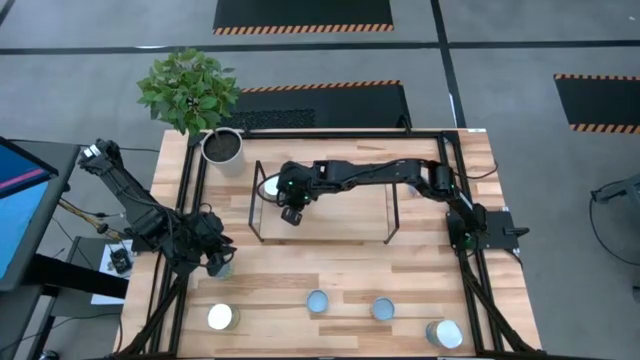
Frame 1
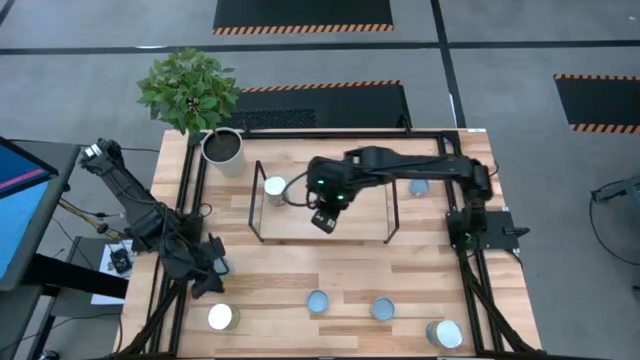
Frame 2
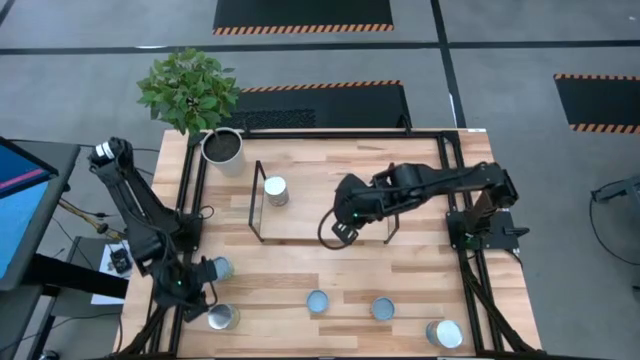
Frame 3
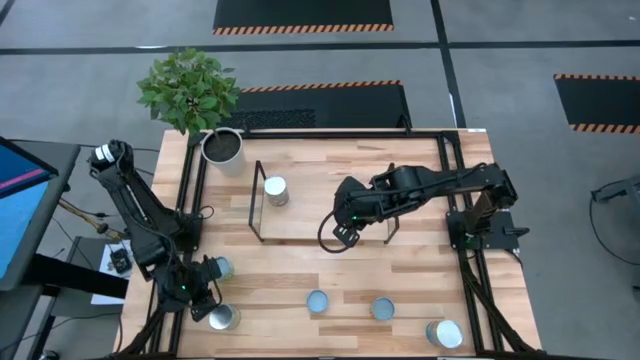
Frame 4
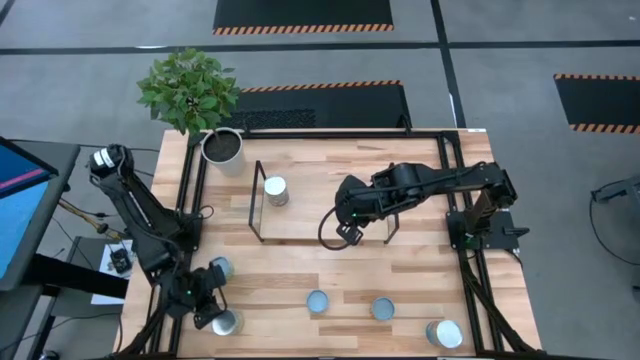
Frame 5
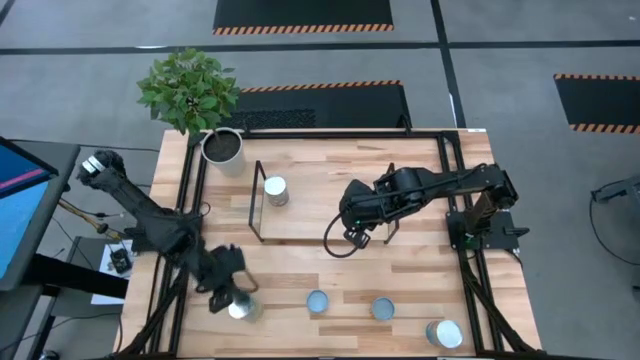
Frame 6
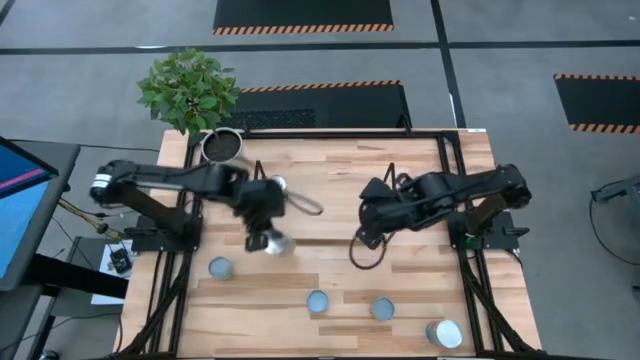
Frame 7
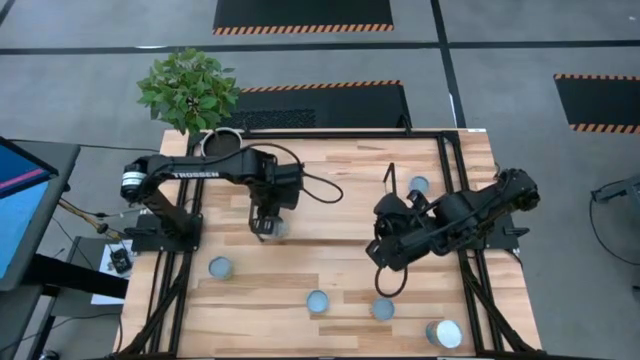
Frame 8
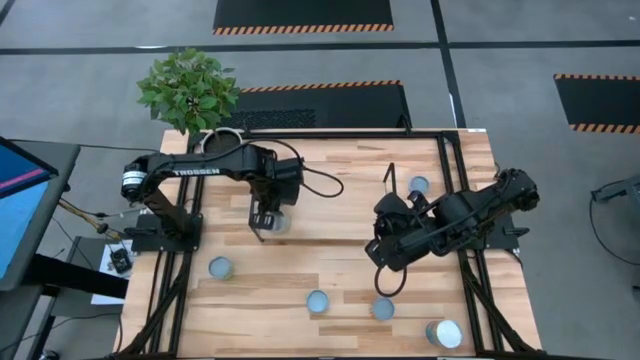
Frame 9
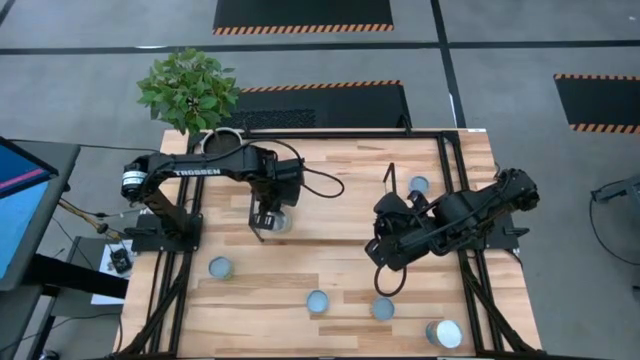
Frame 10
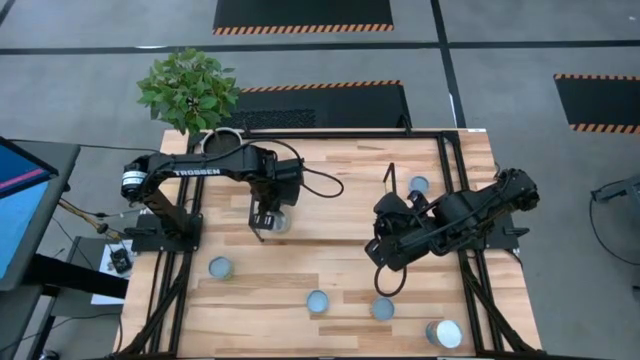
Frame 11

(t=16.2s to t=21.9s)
Task: Pick and place cans onto a shelf
Put the canned carrots on the shelf

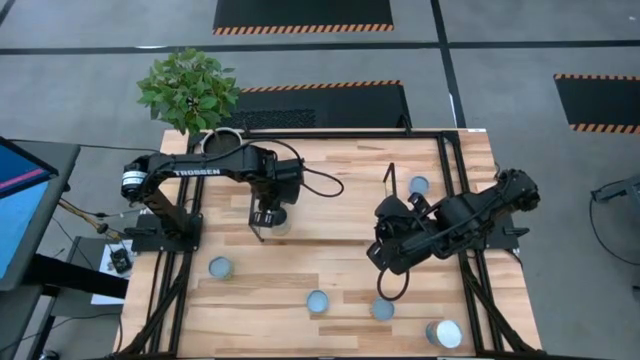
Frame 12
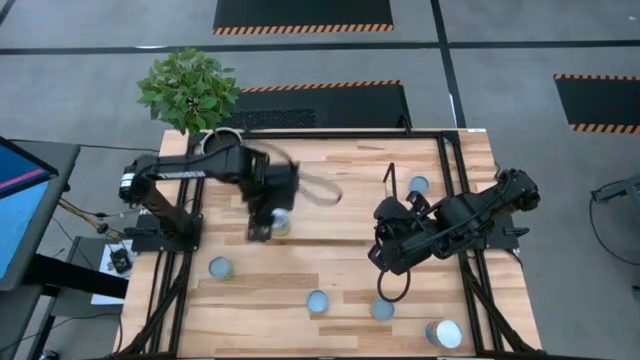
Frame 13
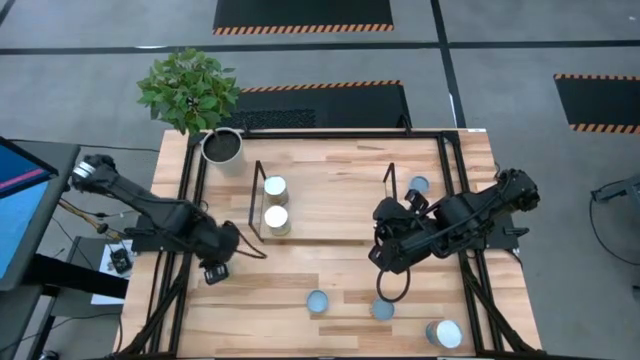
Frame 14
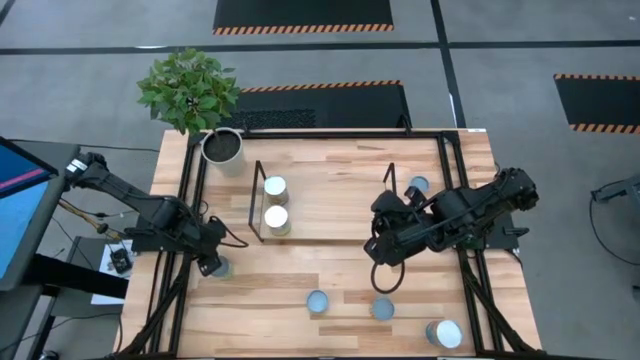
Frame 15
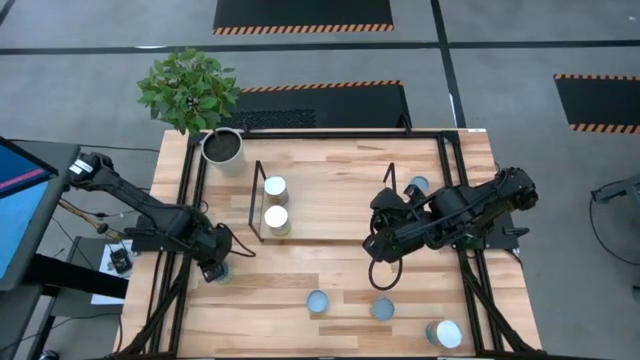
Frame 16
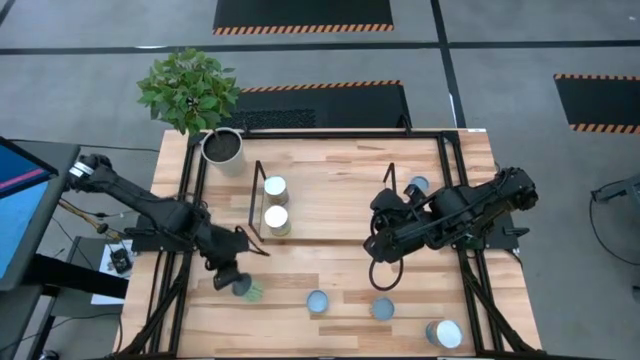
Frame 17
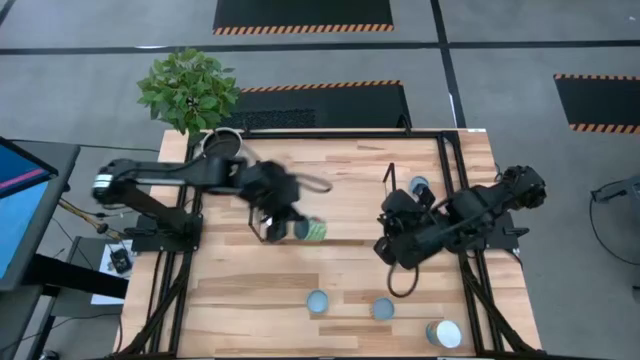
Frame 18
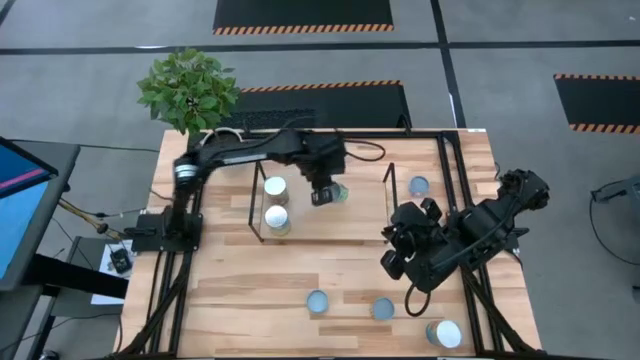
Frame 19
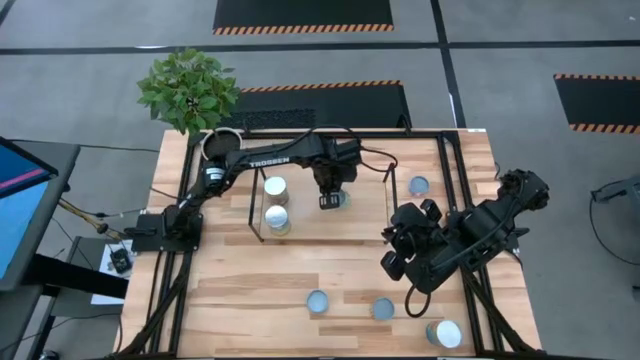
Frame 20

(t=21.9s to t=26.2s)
Put the canned peas on the shelf

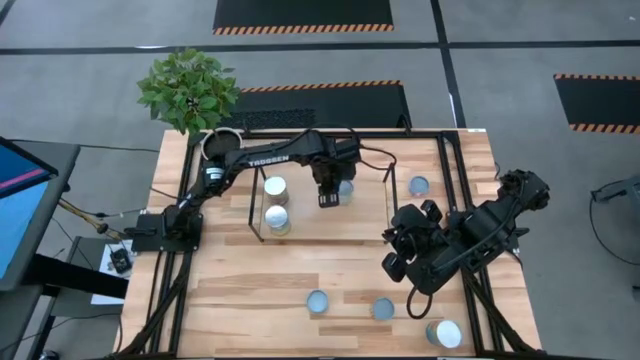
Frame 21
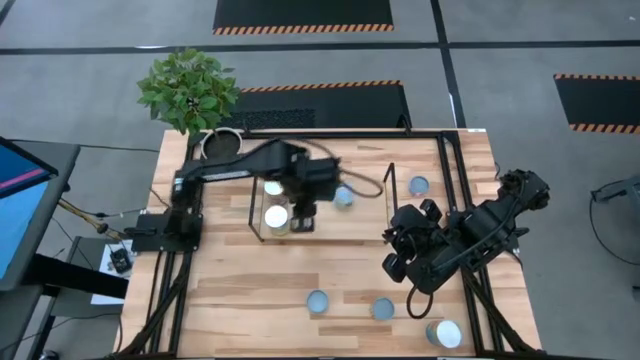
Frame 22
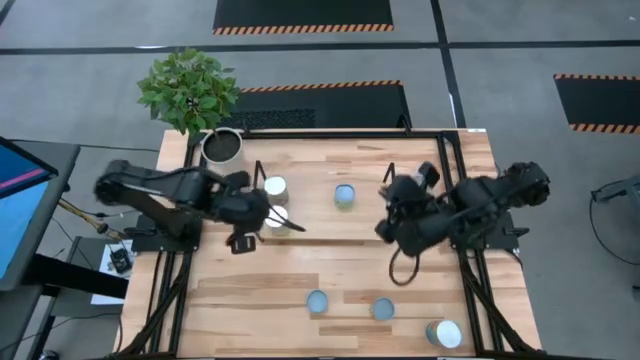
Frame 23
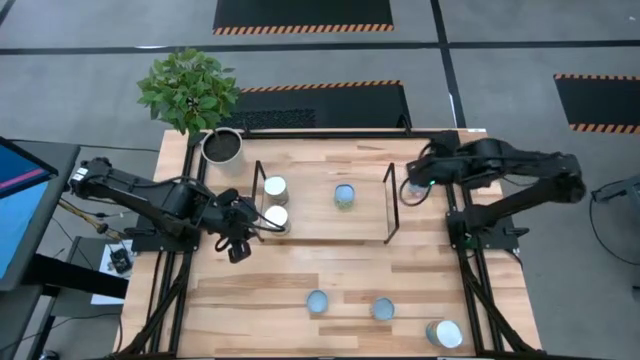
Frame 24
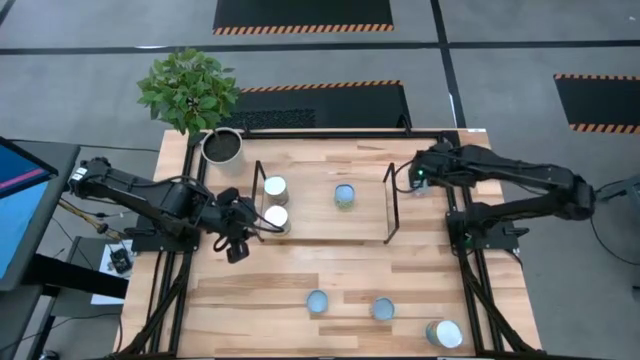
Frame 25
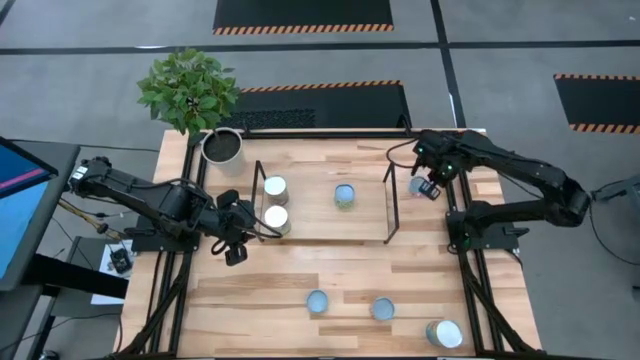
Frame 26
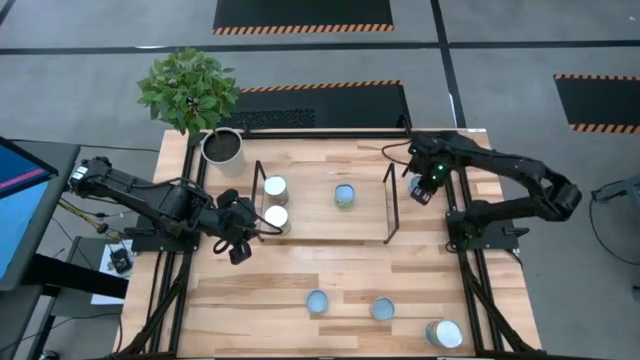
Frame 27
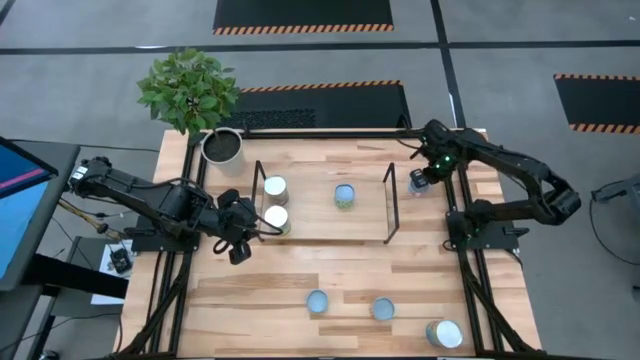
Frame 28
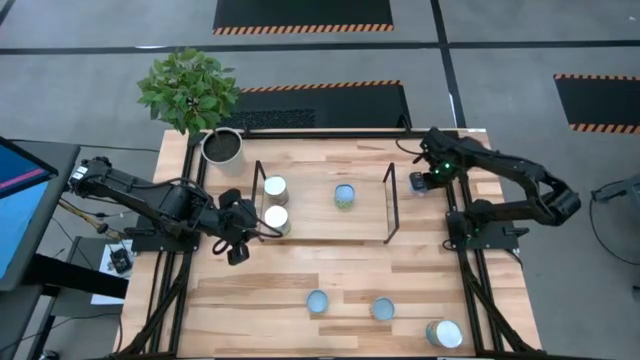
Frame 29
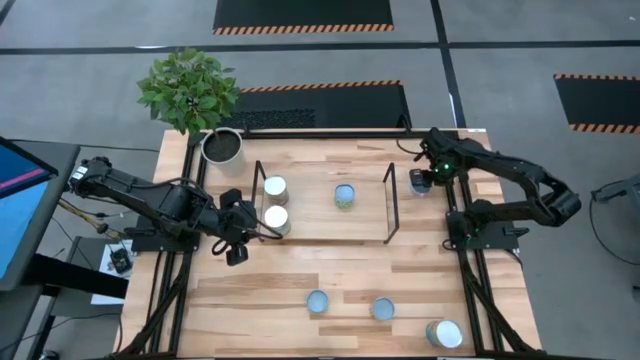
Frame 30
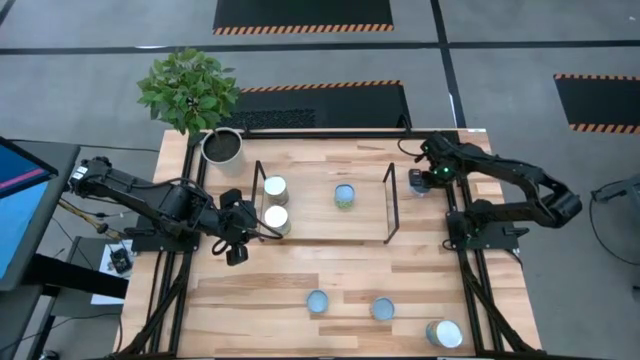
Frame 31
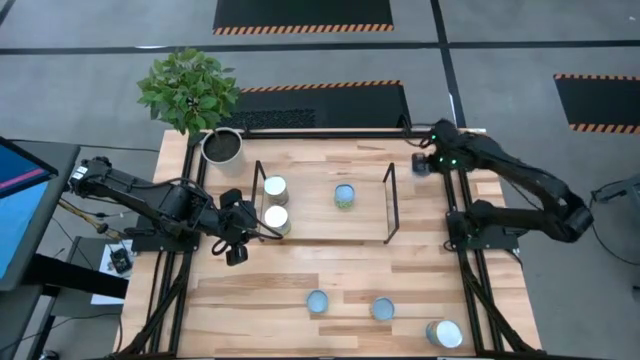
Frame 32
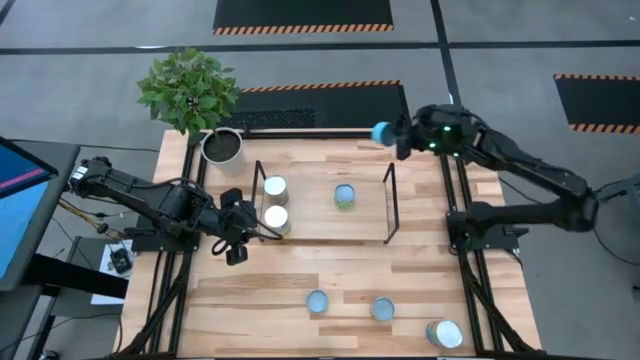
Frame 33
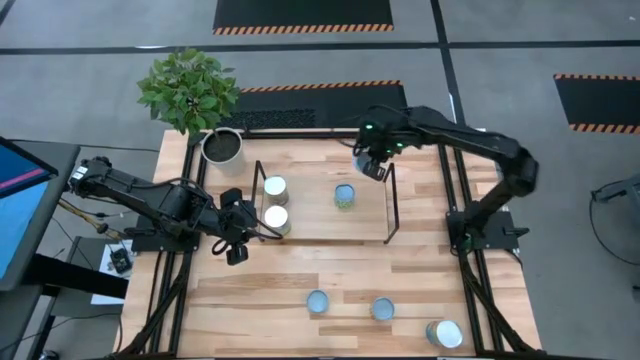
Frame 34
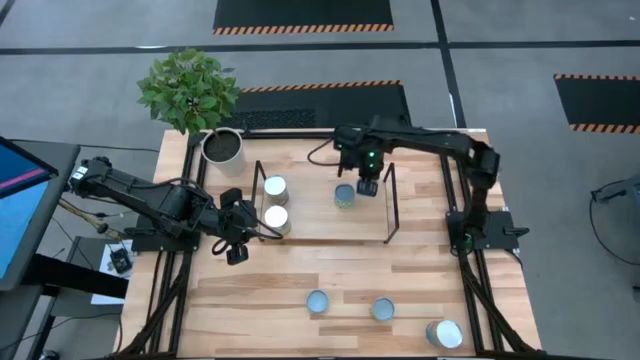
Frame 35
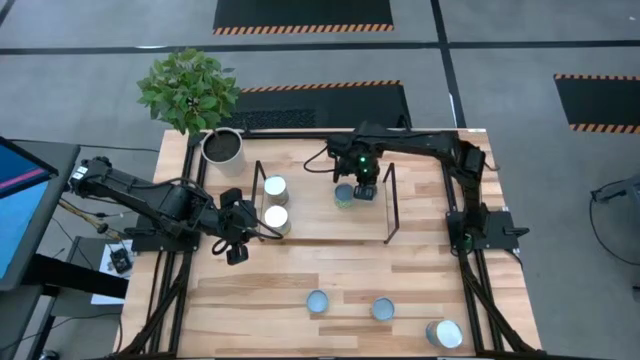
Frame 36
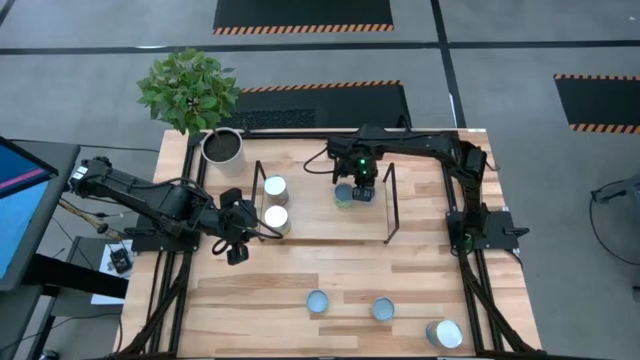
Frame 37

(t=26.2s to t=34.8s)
Put the canned tuna on the shelf

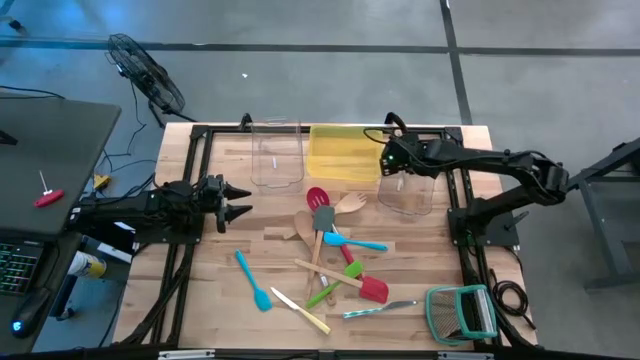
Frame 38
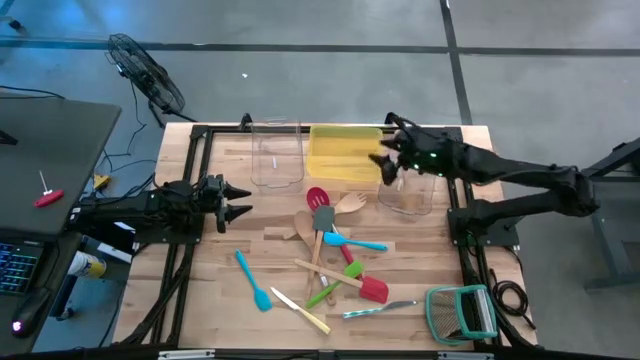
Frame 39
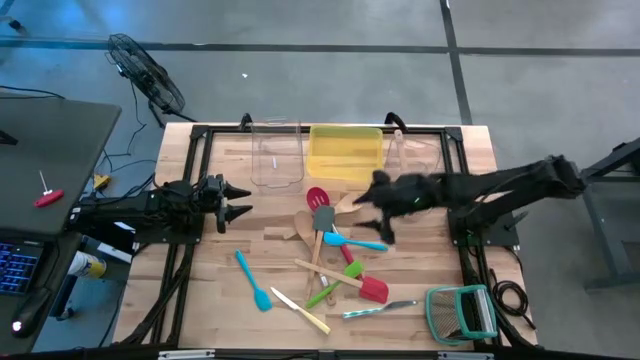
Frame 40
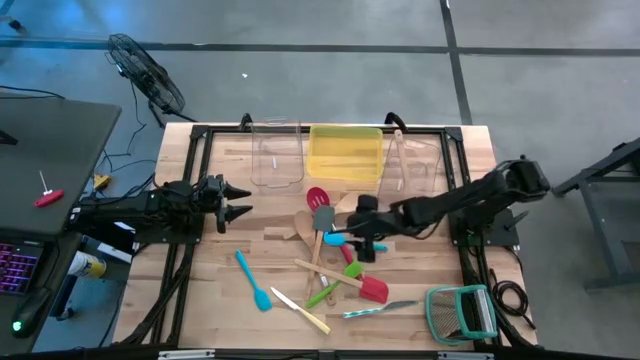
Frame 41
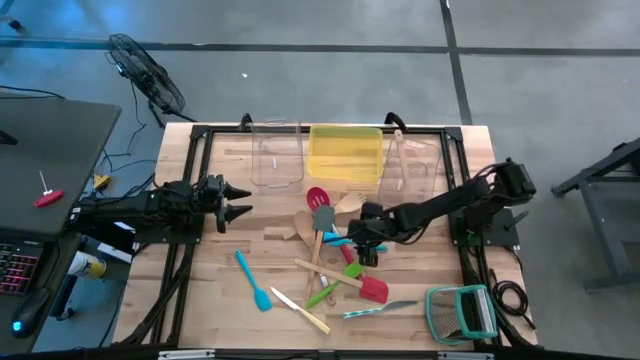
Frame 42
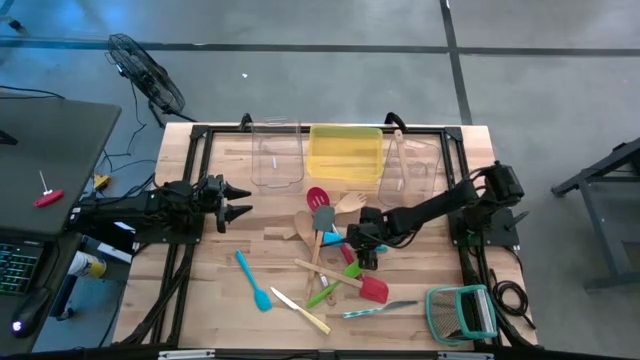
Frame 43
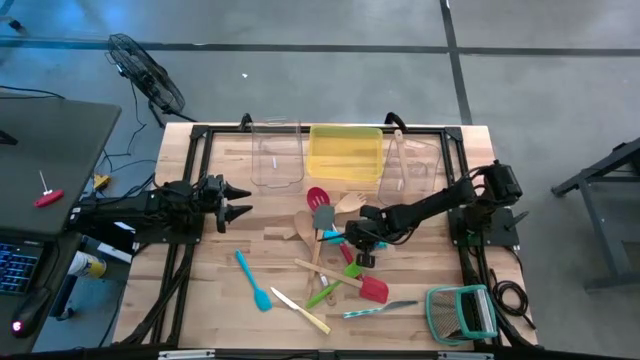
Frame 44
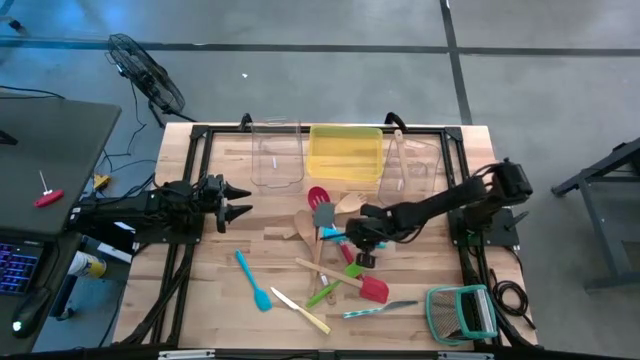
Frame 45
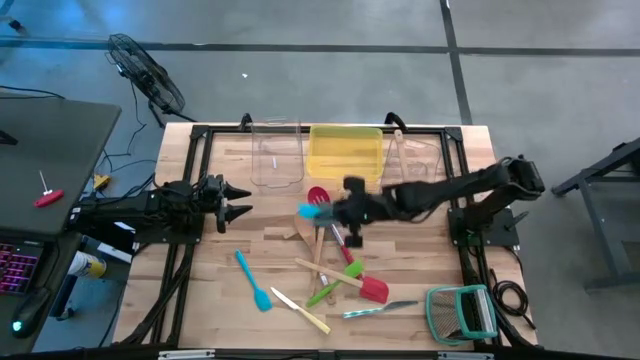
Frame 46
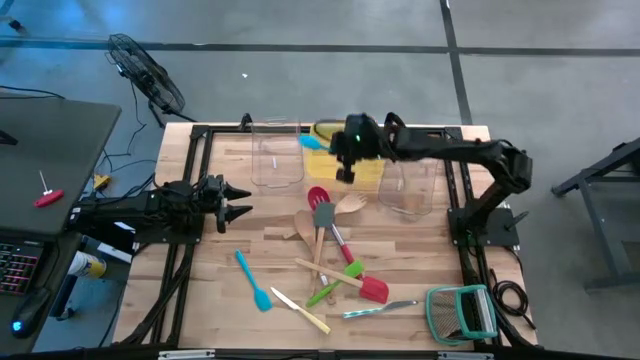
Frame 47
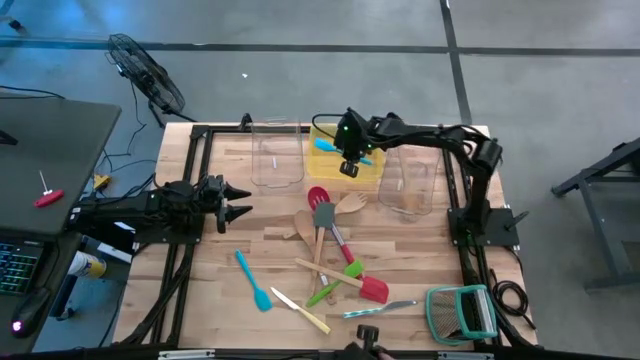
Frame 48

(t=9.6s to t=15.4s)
Task: Pick & Place Kitchen Items
Put the top blue spatula into the yellow bin
